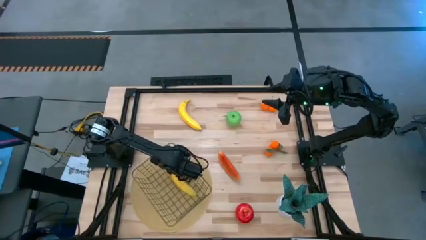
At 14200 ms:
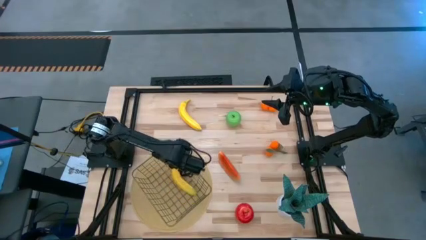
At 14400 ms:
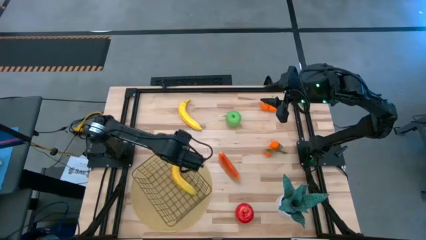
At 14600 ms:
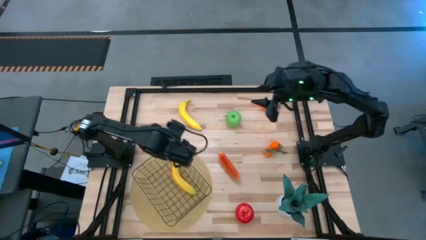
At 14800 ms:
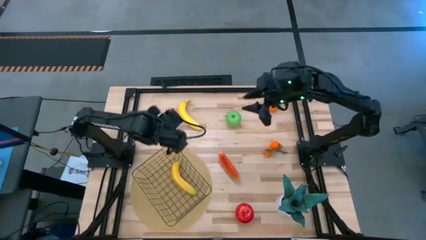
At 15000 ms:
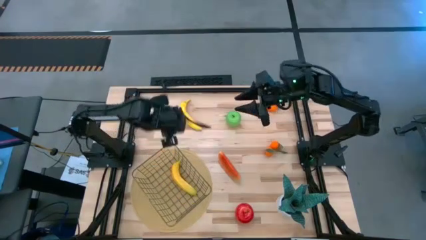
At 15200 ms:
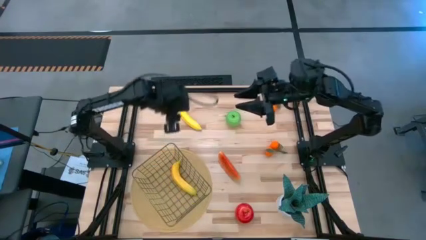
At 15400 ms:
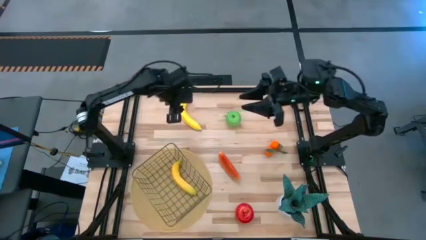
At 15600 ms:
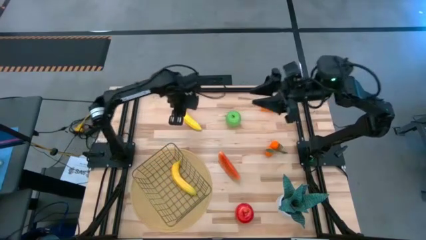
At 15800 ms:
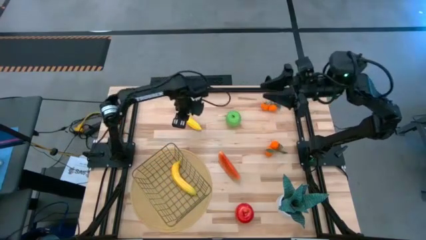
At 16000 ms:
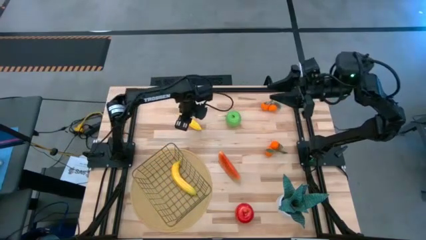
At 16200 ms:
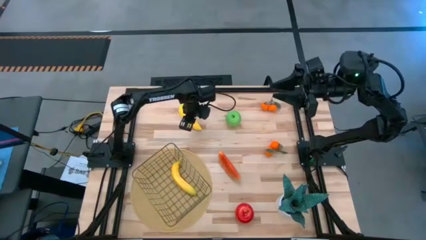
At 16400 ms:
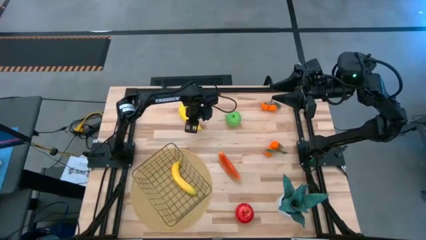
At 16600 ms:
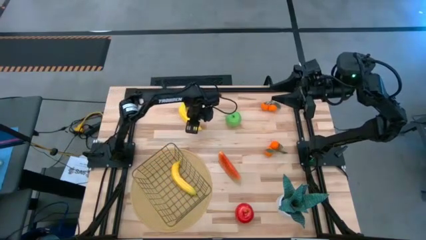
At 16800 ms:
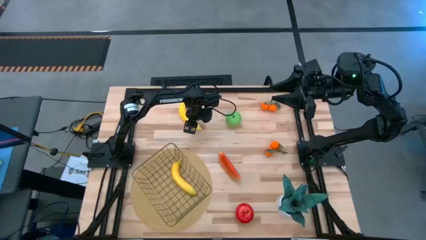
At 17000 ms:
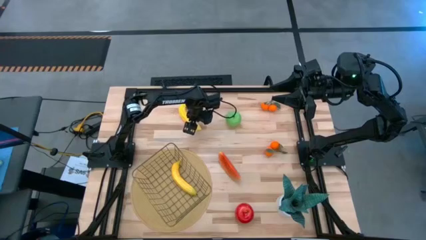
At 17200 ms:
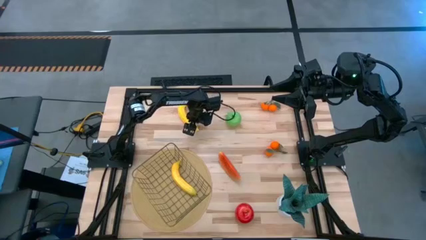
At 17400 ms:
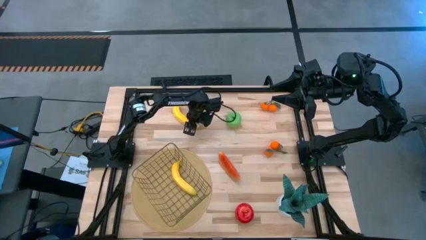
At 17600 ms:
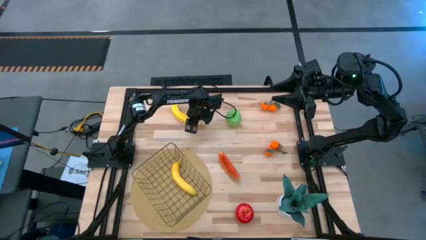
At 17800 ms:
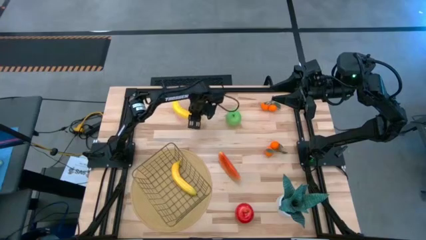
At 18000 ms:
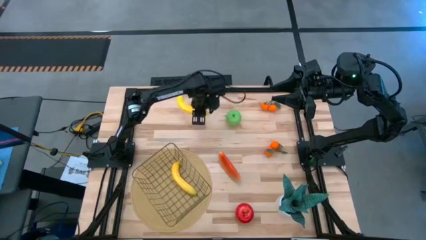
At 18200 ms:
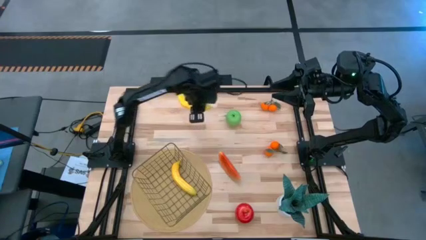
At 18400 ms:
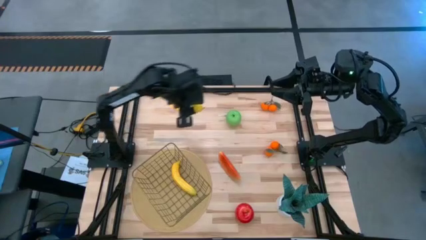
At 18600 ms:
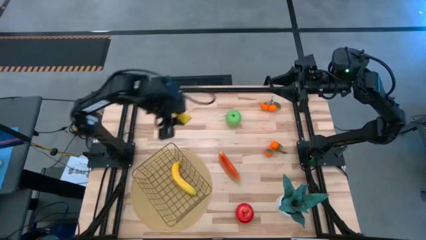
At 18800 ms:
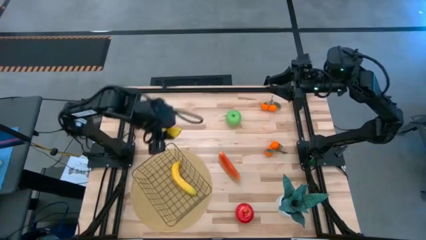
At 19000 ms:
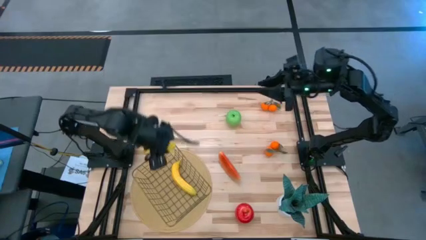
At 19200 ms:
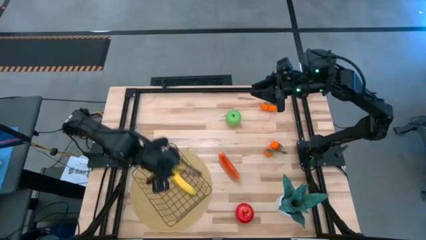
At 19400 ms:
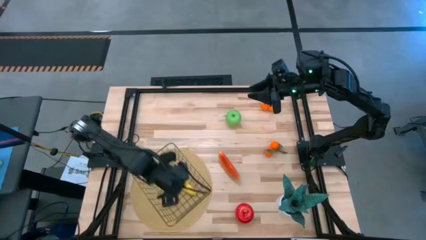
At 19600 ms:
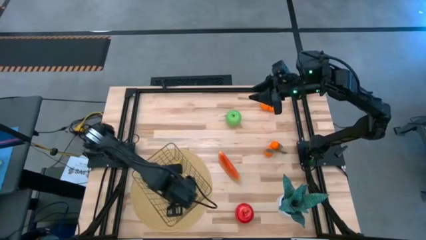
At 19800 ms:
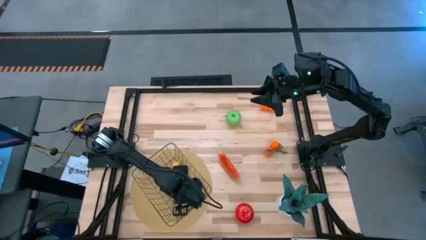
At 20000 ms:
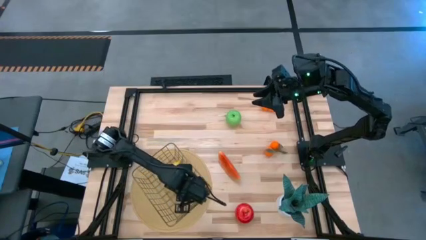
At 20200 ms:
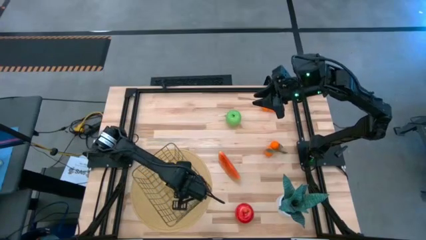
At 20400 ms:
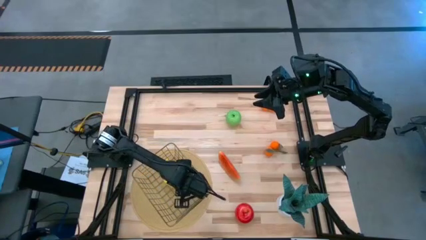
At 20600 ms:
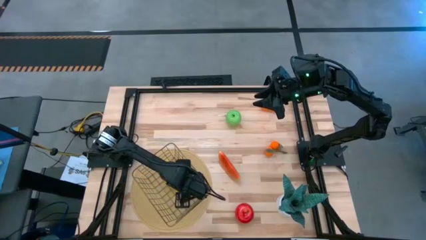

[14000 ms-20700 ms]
Task: Build produce basket
Put the yellow banana into the gold wire basket

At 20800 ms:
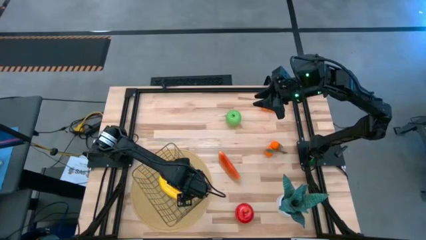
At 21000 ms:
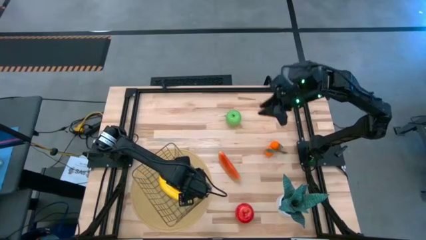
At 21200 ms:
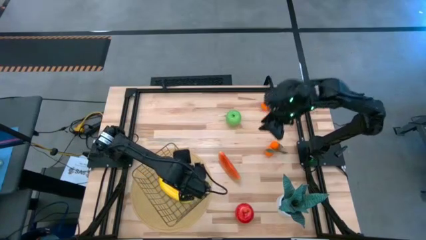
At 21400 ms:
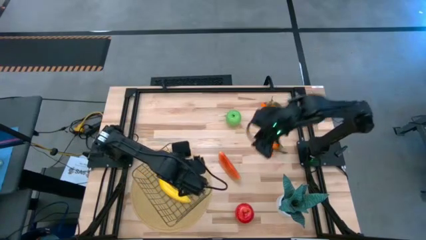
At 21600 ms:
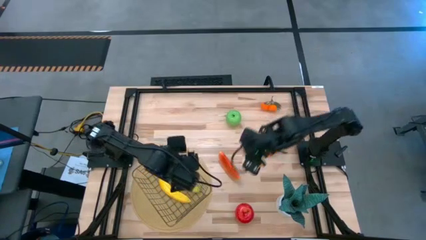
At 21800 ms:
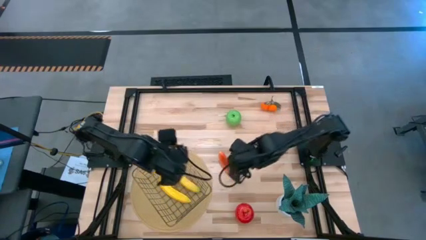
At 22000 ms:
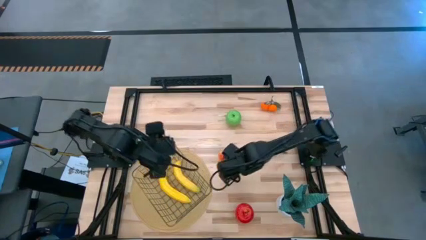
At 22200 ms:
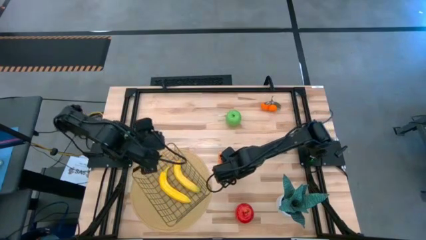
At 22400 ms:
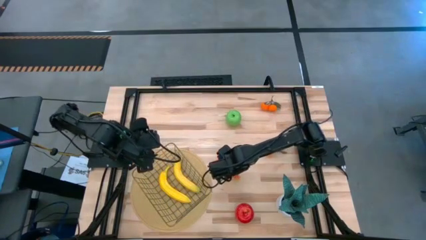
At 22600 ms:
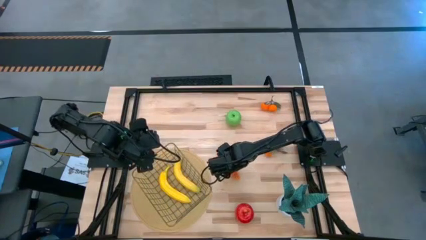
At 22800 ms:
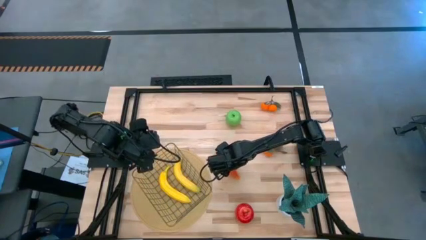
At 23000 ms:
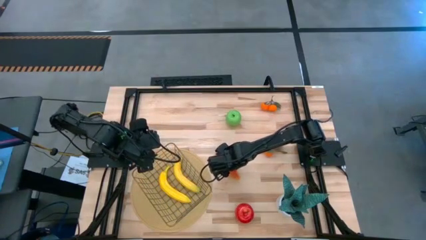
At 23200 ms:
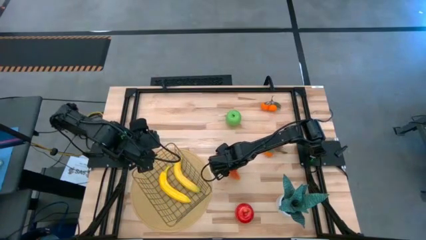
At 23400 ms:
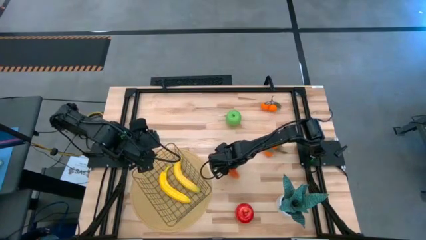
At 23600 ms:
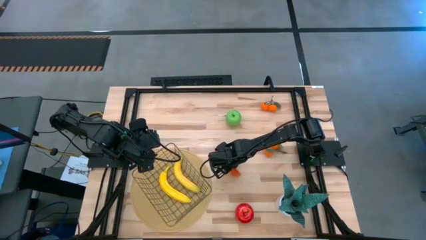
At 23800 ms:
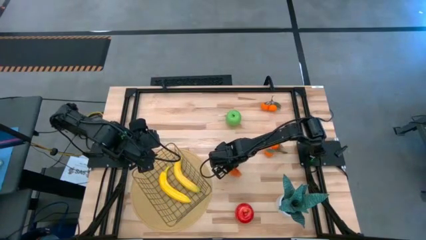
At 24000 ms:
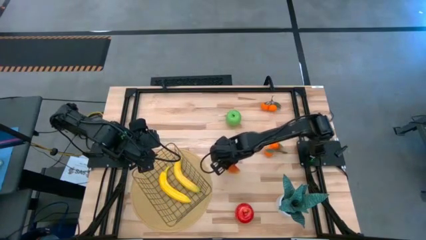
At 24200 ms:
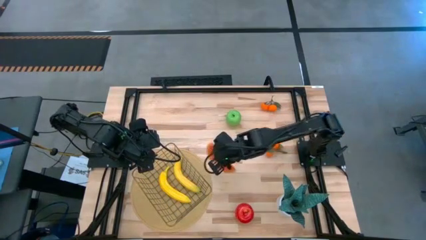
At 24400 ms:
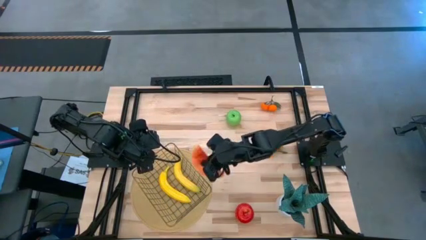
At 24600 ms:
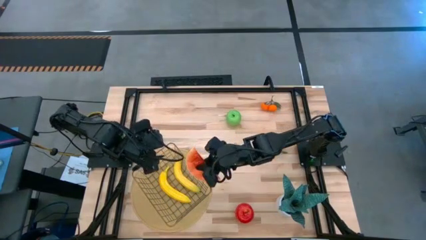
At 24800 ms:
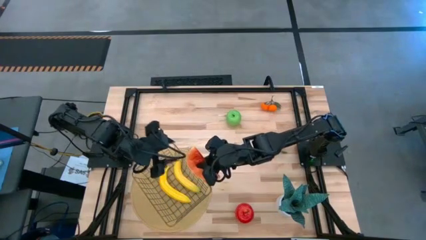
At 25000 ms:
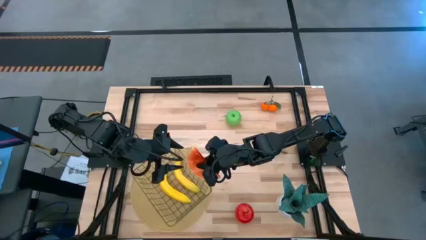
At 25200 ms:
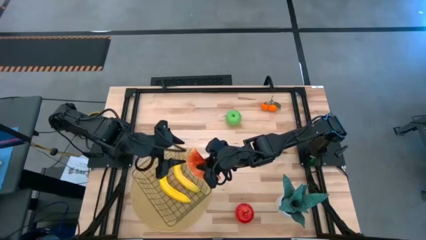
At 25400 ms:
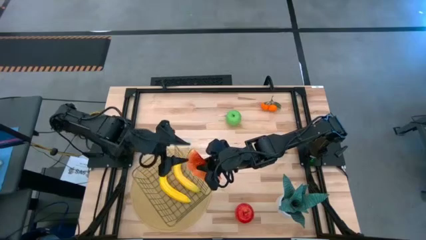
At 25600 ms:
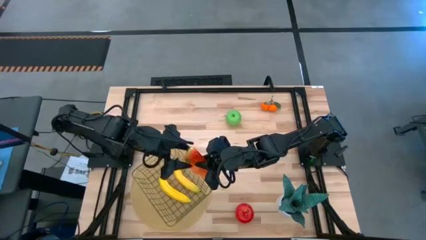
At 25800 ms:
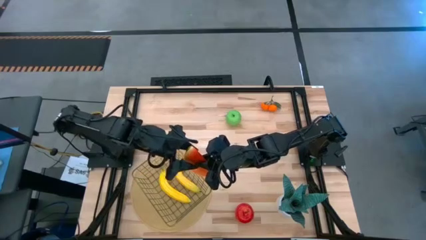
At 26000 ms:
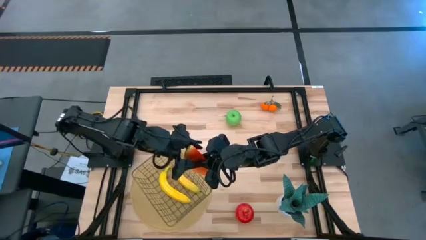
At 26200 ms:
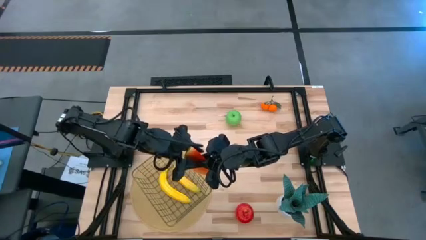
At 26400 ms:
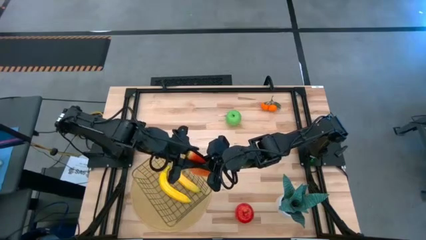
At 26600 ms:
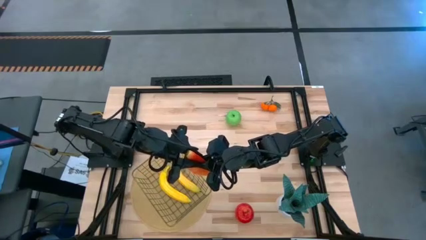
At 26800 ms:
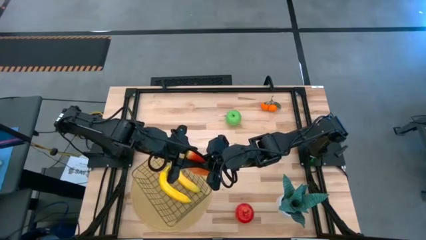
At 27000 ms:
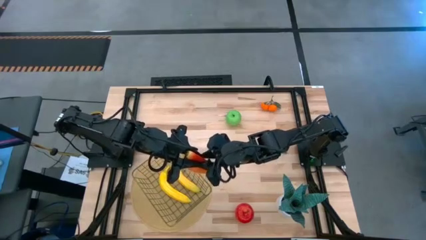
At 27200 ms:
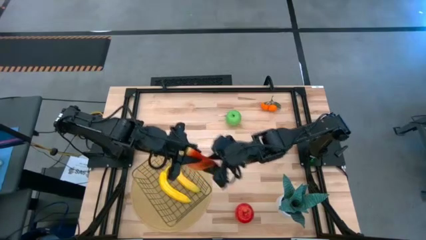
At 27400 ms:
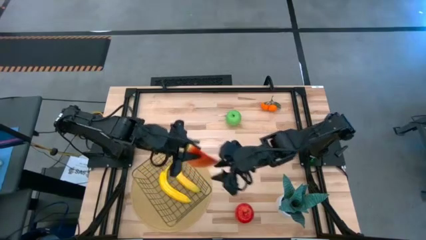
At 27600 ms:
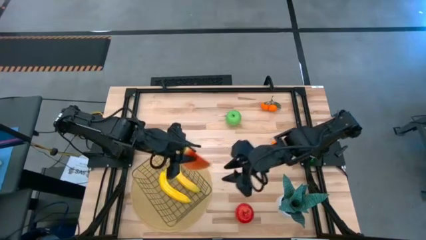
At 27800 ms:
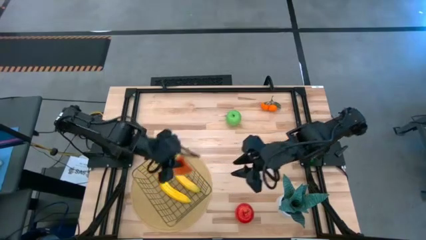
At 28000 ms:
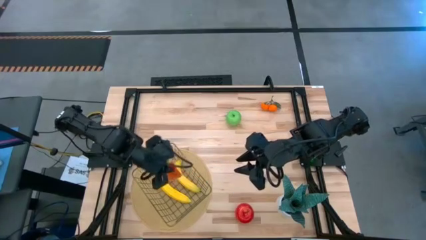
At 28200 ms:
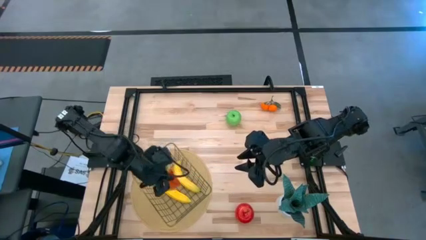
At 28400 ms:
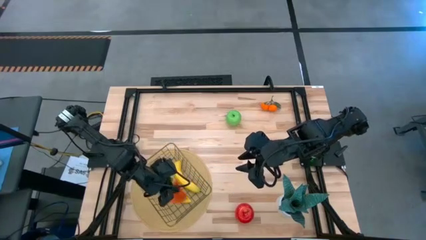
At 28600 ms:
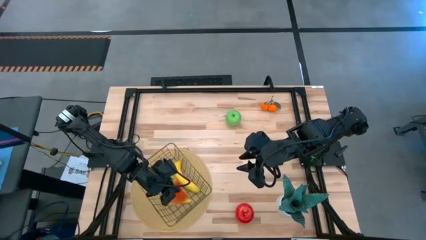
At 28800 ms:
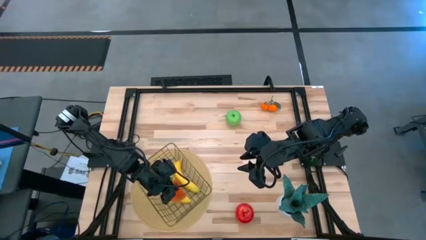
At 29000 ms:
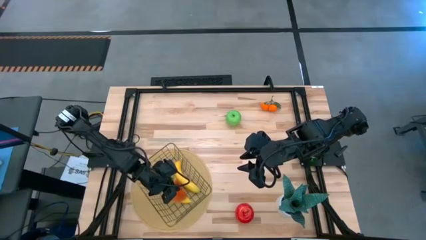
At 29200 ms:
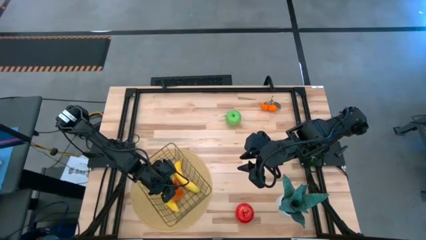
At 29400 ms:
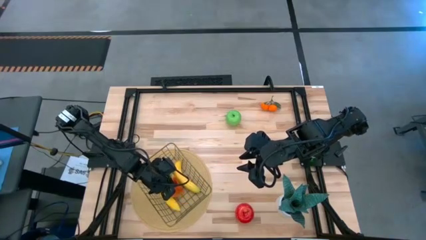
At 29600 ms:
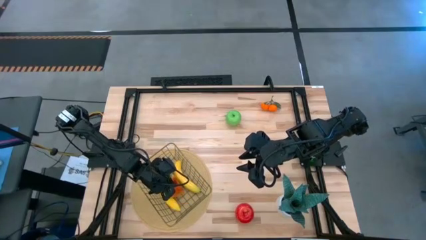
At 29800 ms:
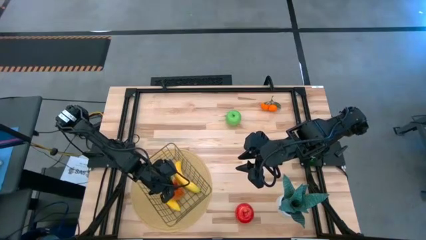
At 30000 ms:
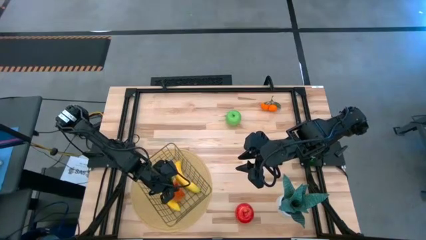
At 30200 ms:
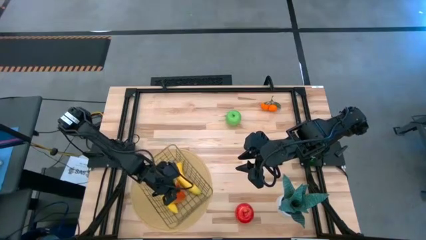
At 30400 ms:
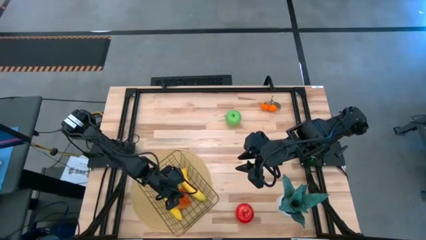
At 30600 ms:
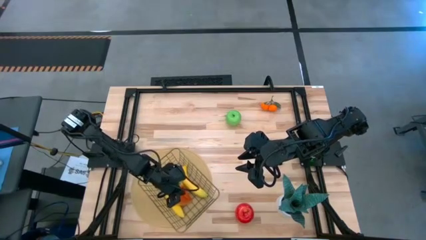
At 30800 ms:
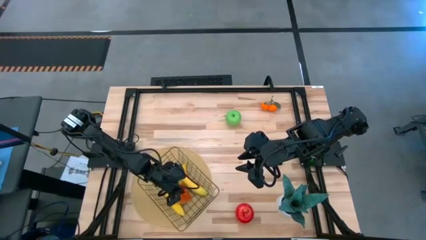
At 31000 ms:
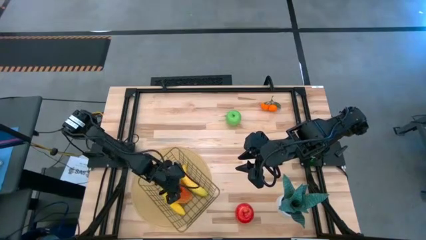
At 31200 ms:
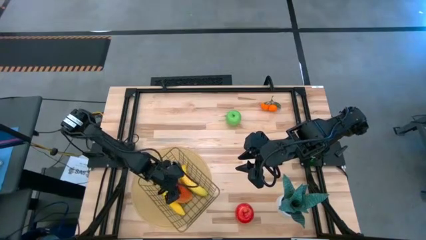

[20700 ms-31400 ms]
Put the red watermelon into the gold wire basket
